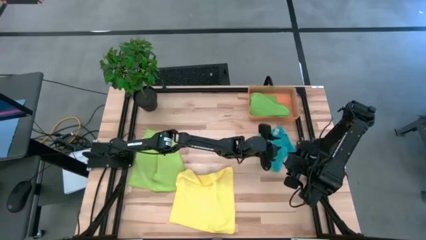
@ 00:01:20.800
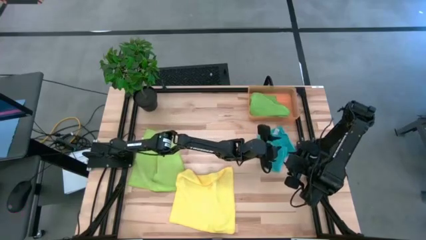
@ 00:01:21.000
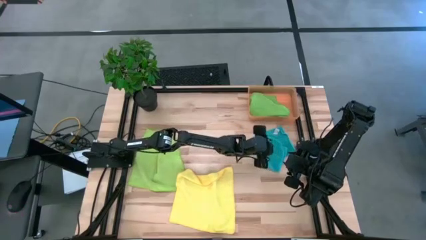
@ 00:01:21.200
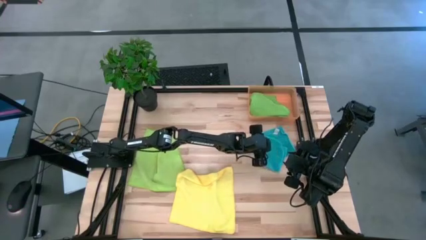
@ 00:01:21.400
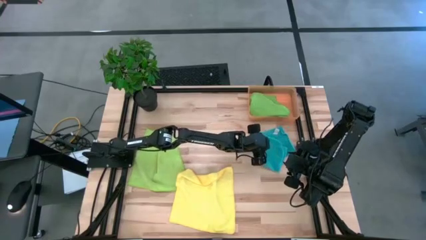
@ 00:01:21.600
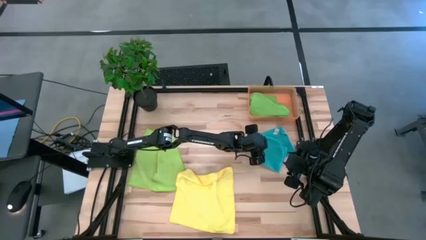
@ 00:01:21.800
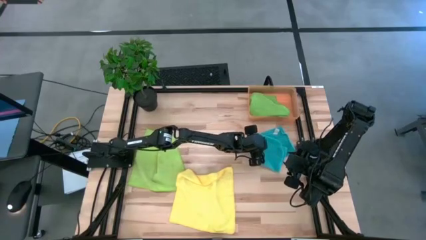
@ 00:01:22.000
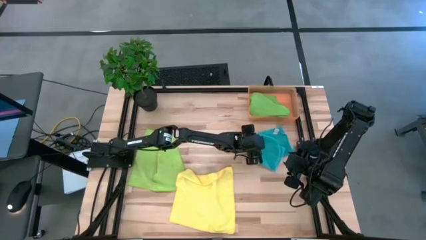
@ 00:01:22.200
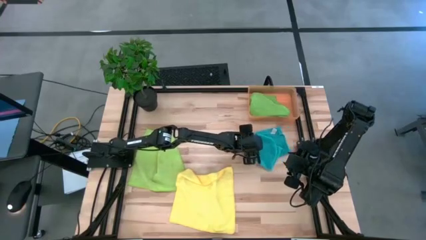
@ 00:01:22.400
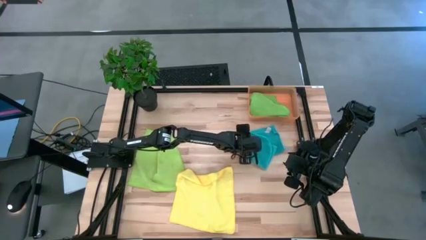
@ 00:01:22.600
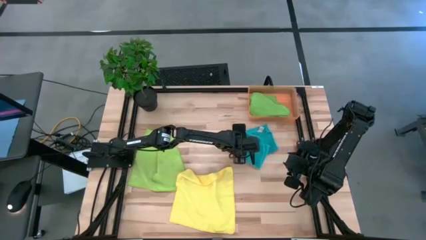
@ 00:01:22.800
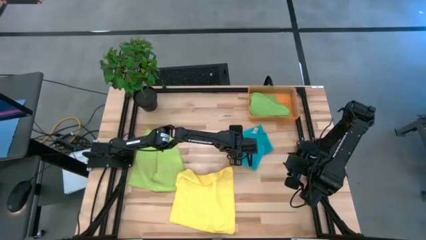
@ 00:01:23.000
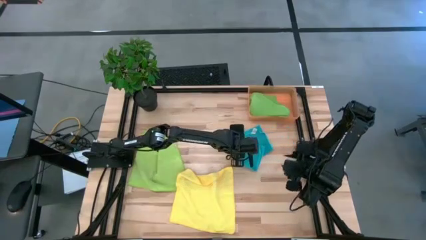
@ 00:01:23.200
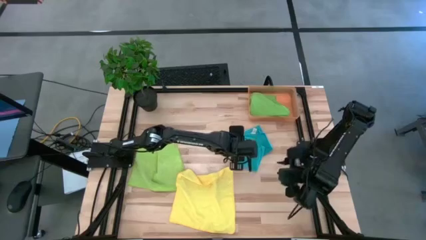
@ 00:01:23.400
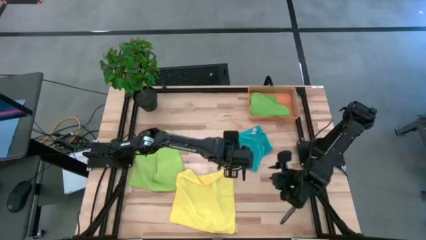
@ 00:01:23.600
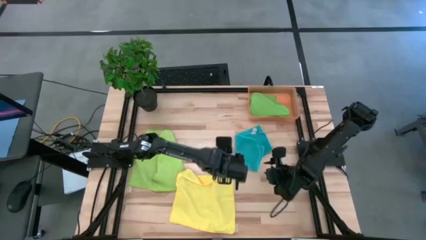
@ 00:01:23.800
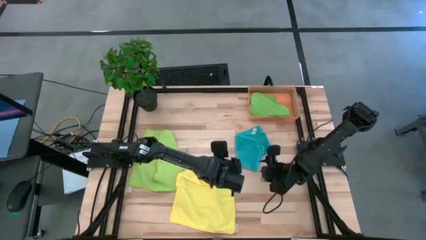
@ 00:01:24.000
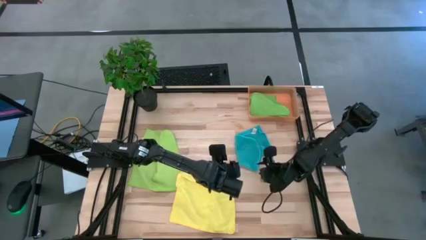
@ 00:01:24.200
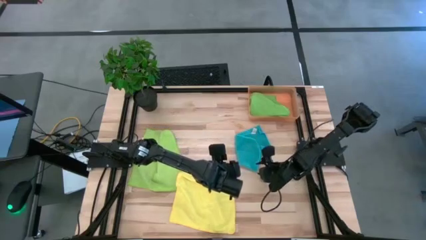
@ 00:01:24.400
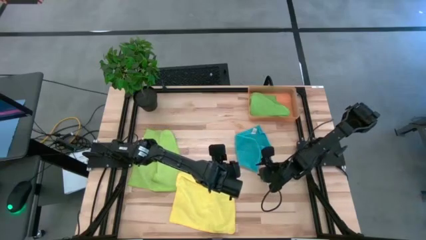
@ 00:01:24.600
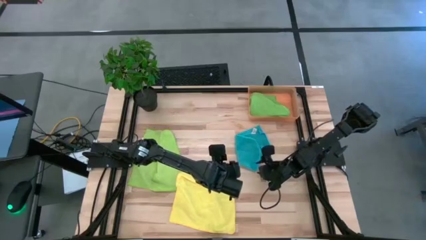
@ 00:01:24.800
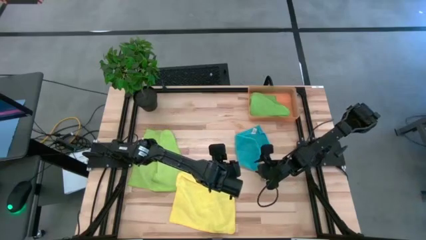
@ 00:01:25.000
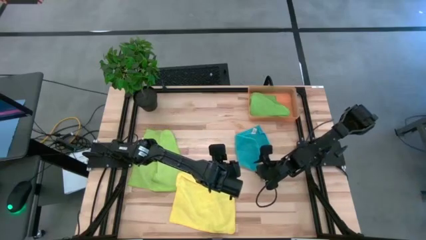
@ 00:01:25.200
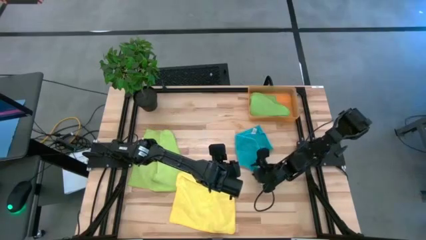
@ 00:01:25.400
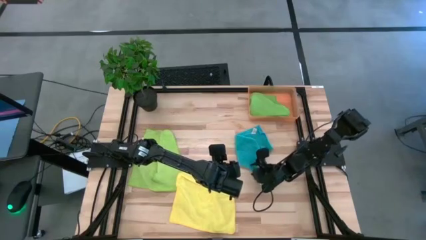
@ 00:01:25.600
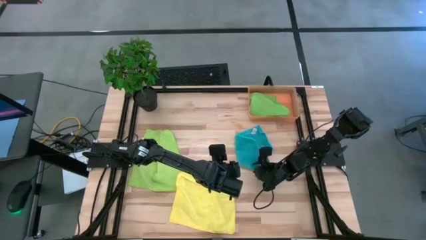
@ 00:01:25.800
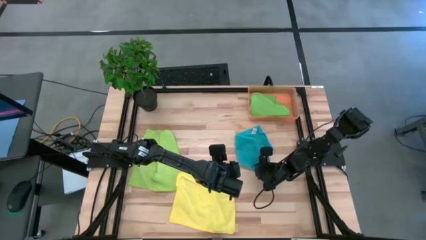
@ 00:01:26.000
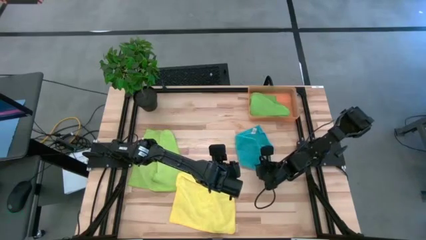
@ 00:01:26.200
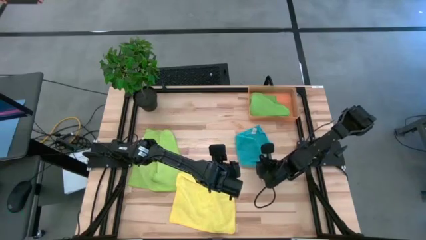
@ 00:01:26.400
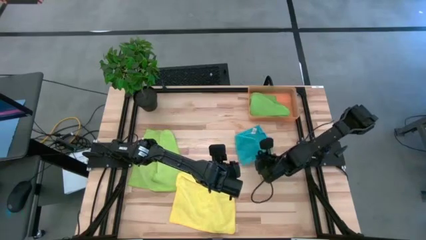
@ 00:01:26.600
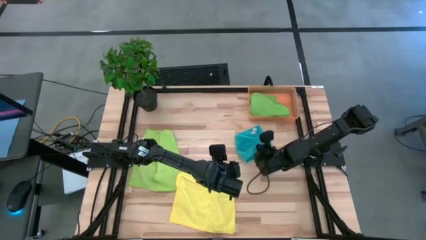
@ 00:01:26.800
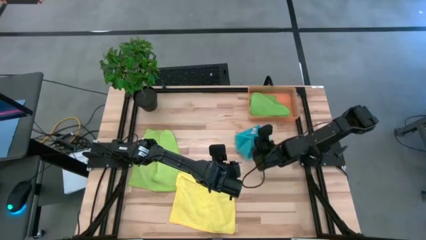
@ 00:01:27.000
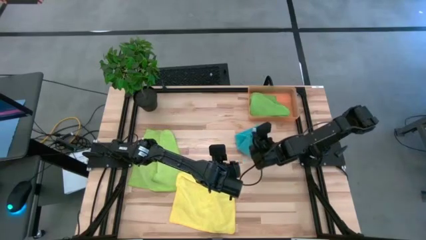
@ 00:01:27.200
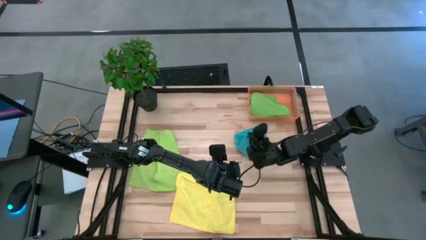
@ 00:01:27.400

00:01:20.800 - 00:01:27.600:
Task: Fold microfiber towels
Fold the blue microfiber towel

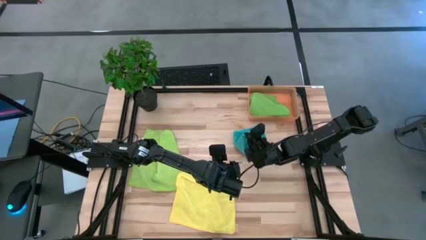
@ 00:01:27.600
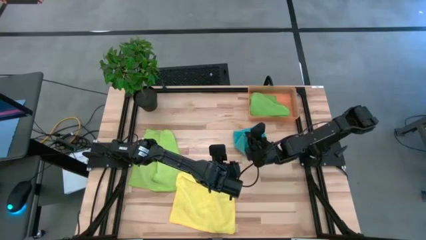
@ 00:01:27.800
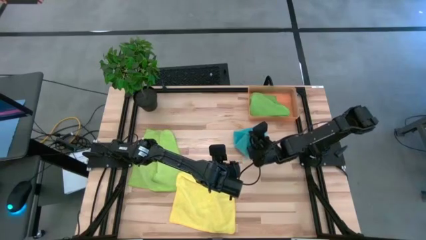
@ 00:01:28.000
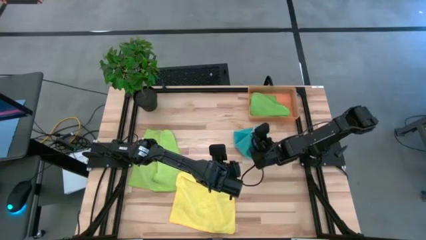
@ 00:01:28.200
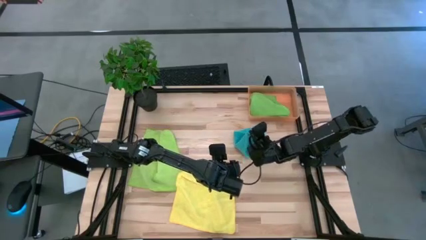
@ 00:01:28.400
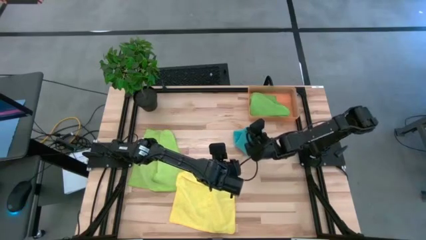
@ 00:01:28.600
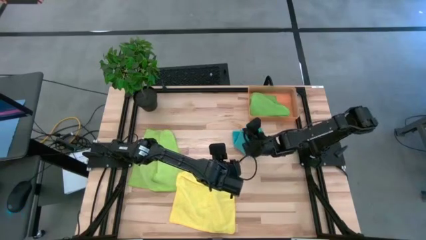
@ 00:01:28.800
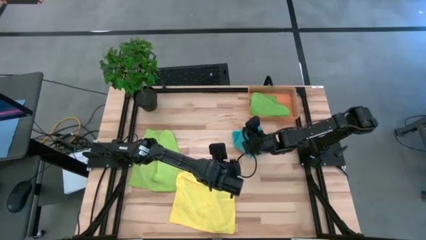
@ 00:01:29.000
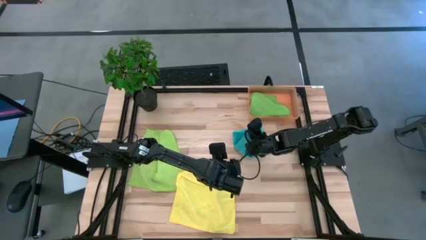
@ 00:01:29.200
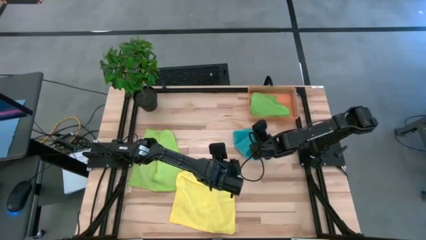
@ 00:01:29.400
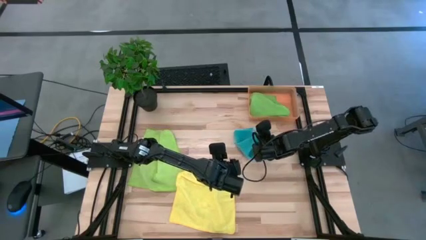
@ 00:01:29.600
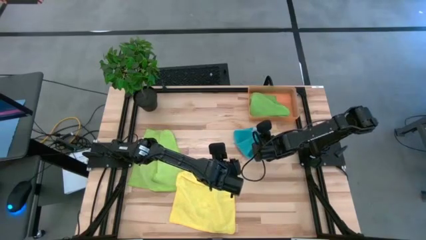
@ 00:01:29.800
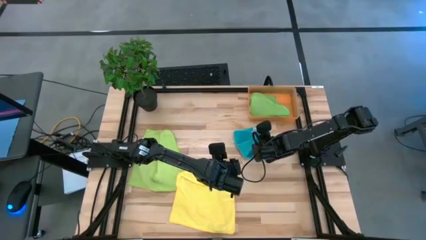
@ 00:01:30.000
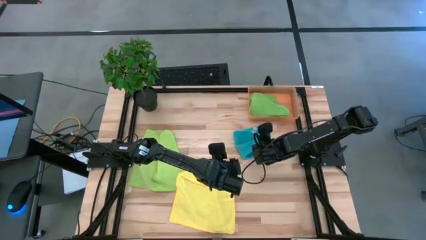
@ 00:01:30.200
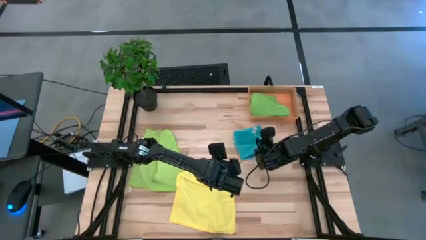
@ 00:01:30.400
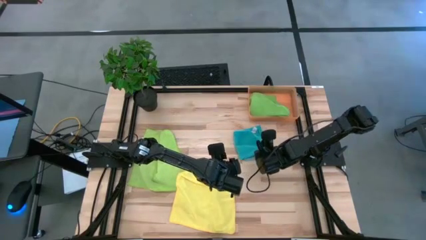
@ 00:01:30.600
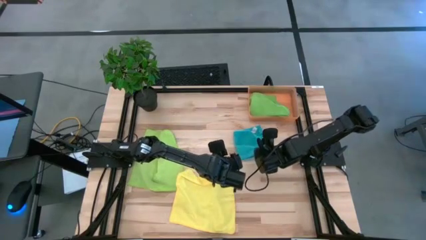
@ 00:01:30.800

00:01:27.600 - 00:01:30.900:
Fold the blue microfiber towel
